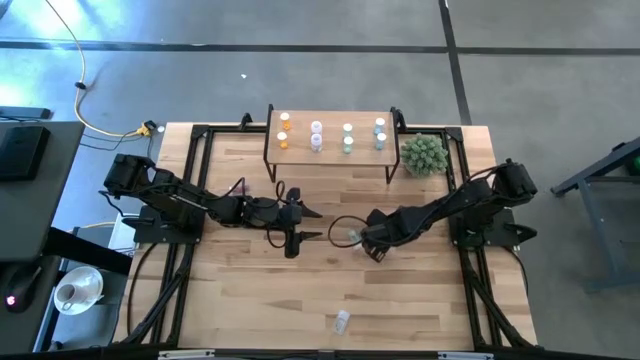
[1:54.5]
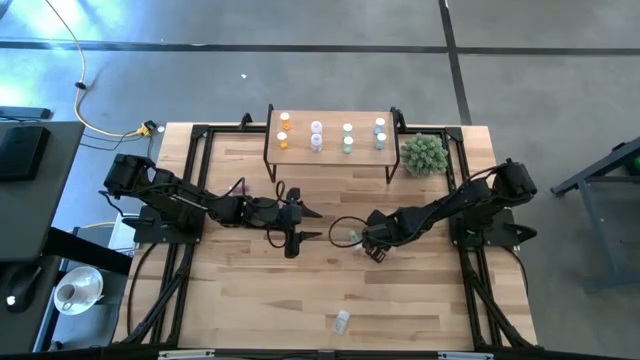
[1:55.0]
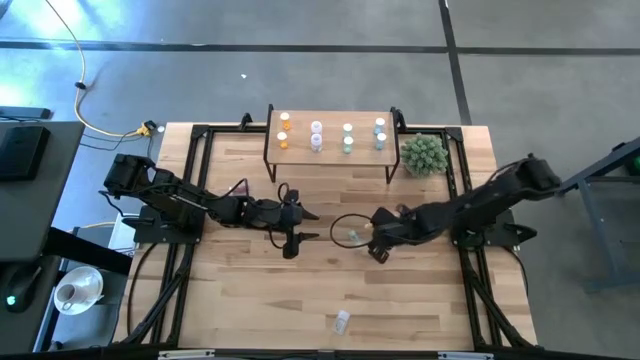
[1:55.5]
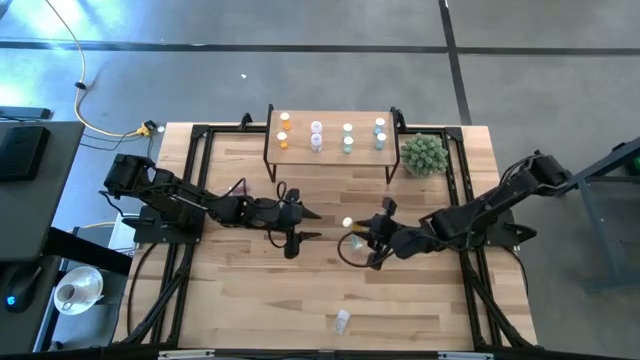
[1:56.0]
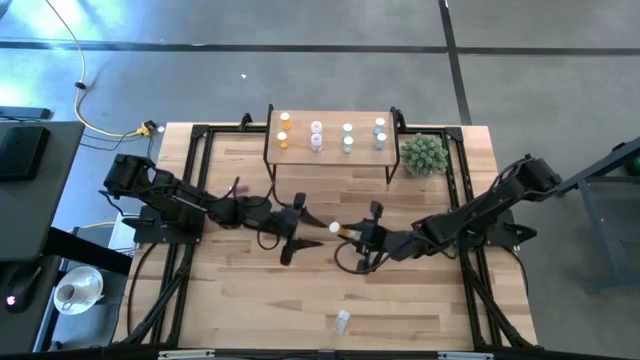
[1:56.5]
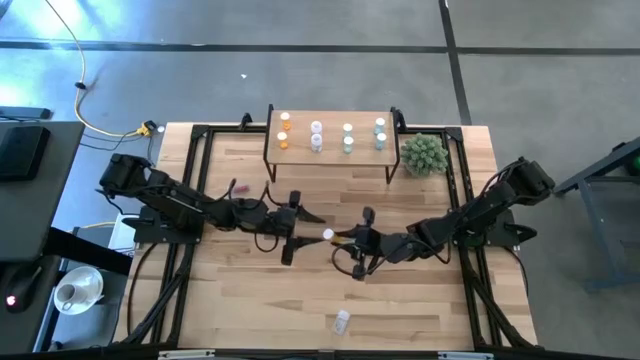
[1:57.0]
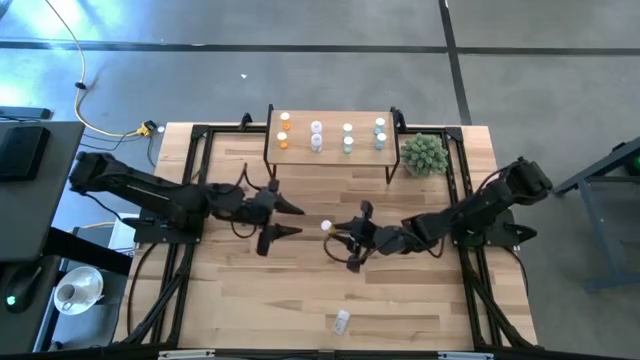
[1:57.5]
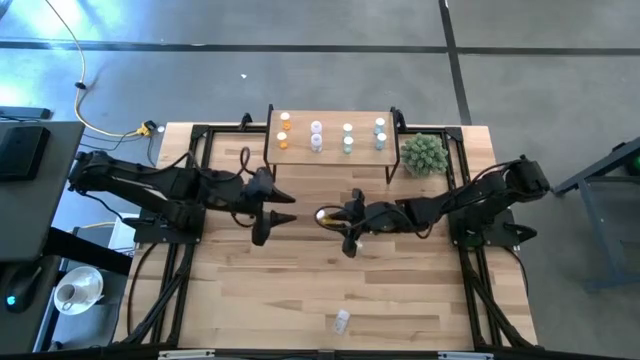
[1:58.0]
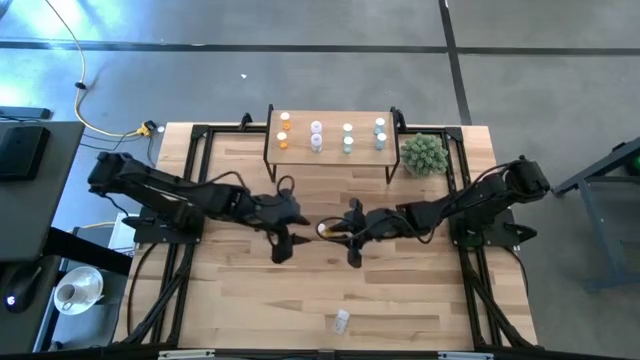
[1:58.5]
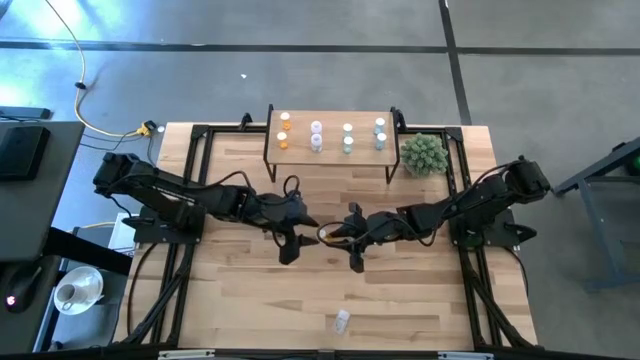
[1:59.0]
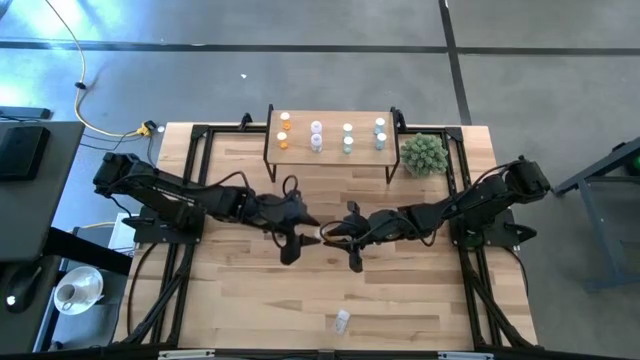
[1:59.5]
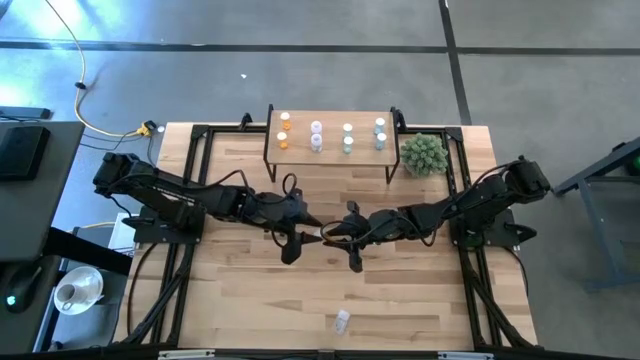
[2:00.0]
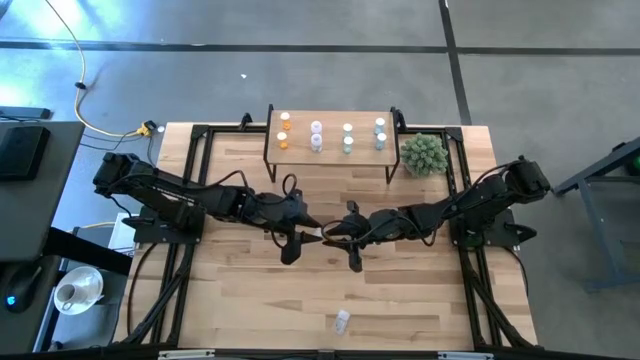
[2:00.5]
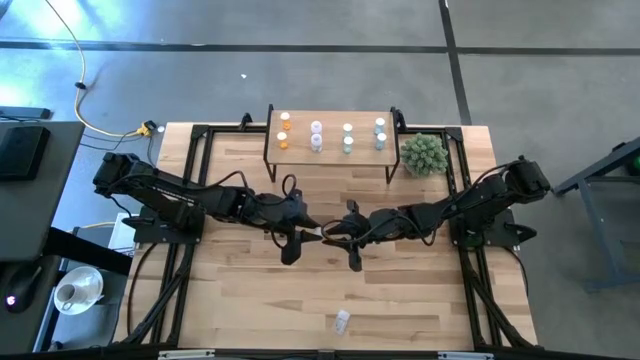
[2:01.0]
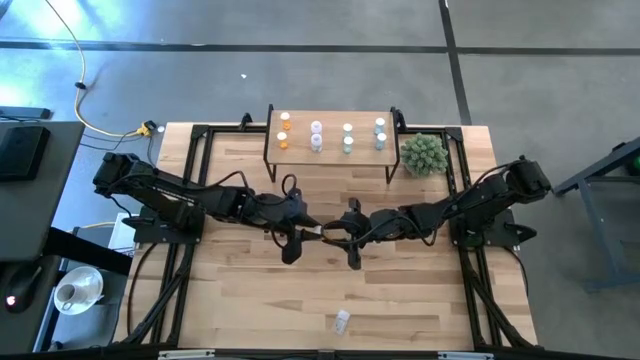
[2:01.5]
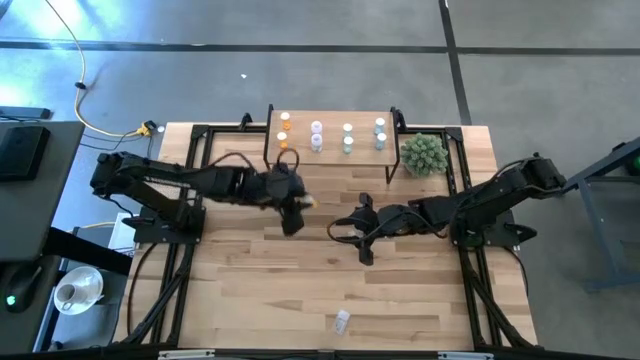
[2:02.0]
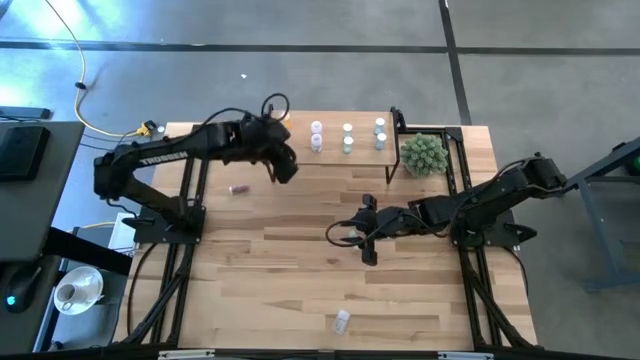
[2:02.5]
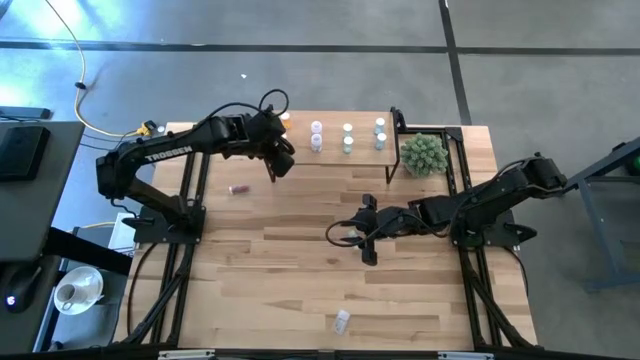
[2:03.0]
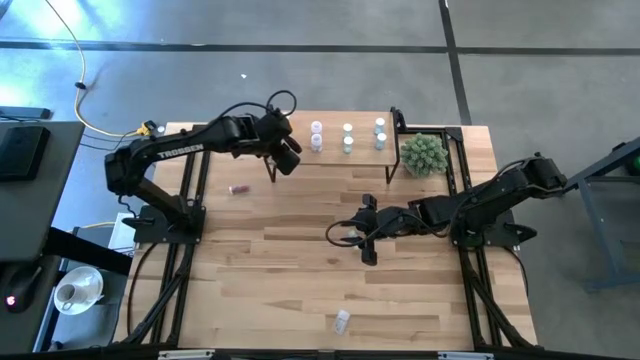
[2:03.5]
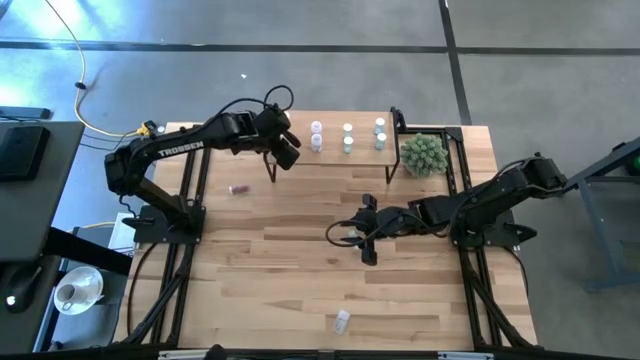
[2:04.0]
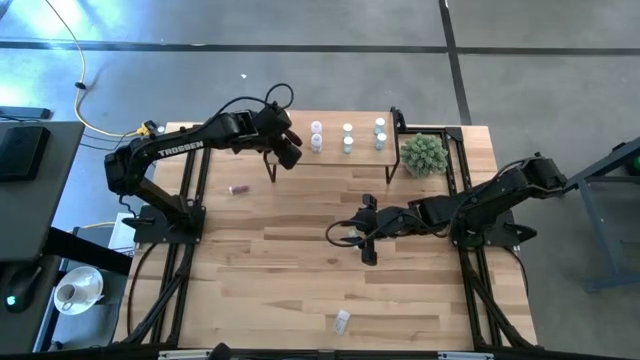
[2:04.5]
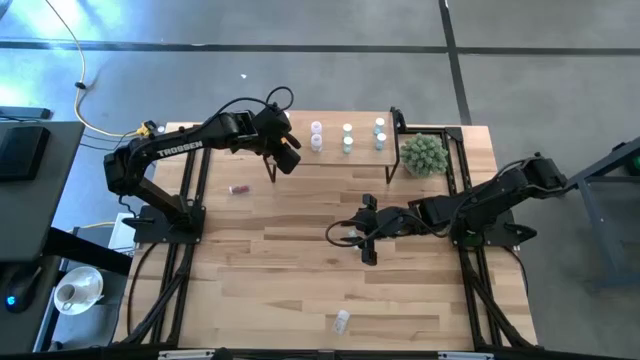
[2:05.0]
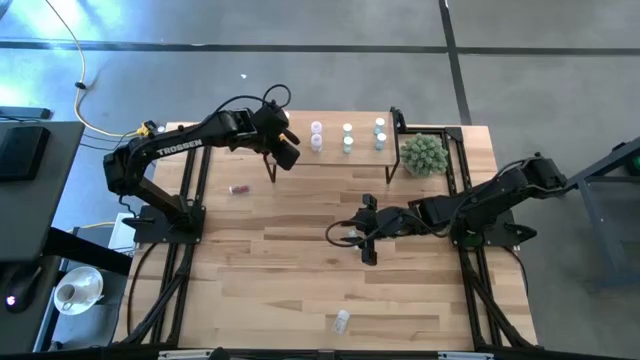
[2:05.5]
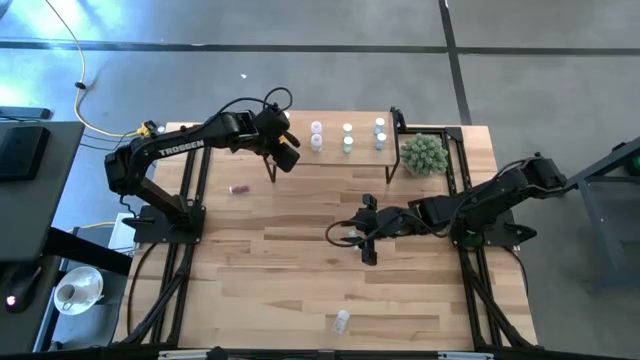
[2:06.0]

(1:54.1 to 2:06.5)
Task: Pick and place medicine bottles onto shelf by color
Put the orange pill bottle on the shelf and aligned with the other orange pill bottles

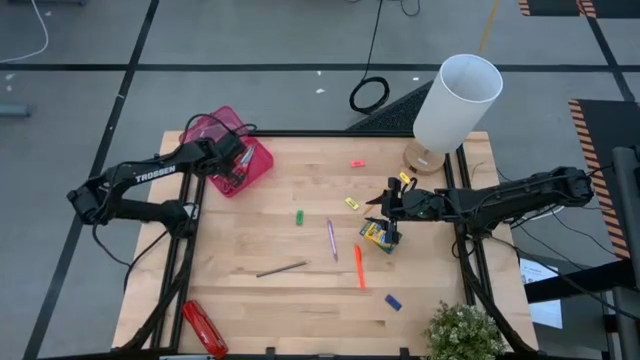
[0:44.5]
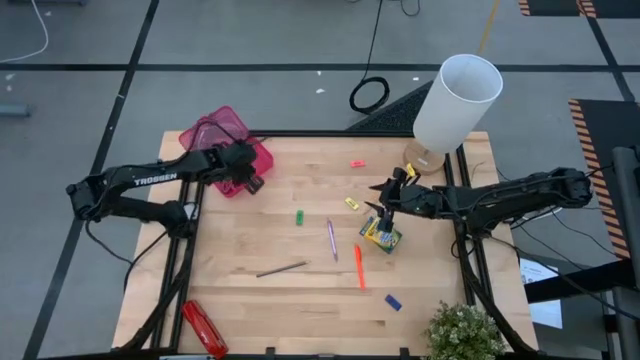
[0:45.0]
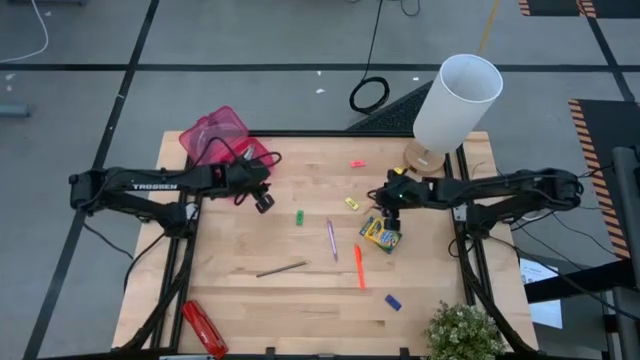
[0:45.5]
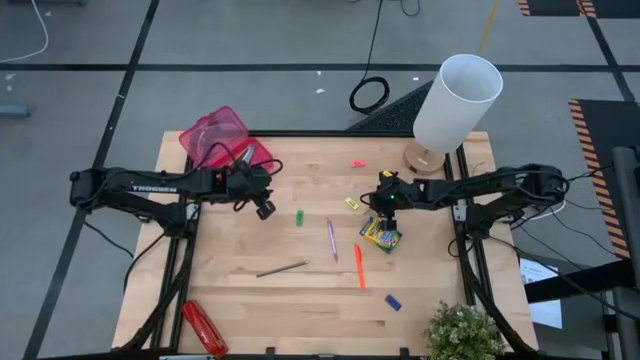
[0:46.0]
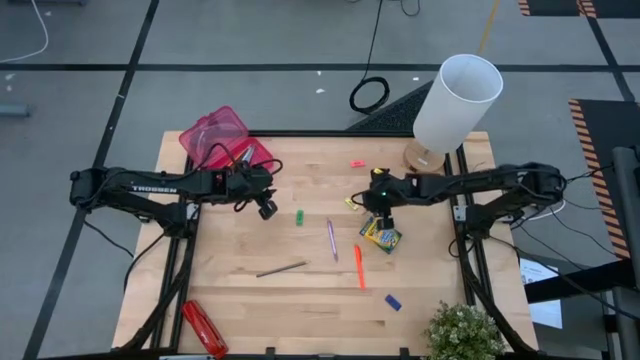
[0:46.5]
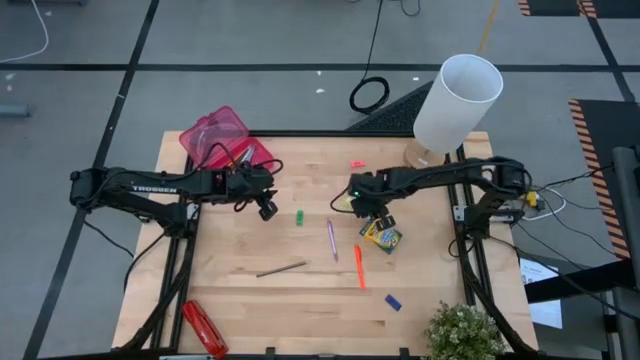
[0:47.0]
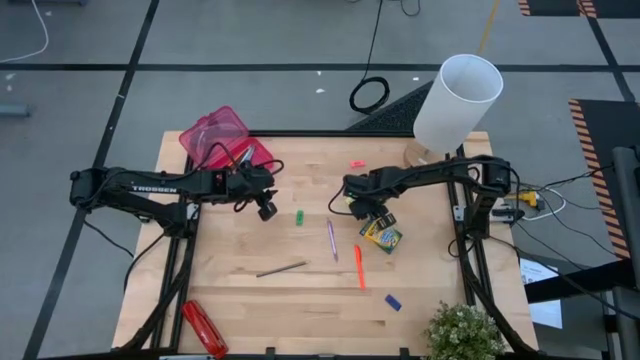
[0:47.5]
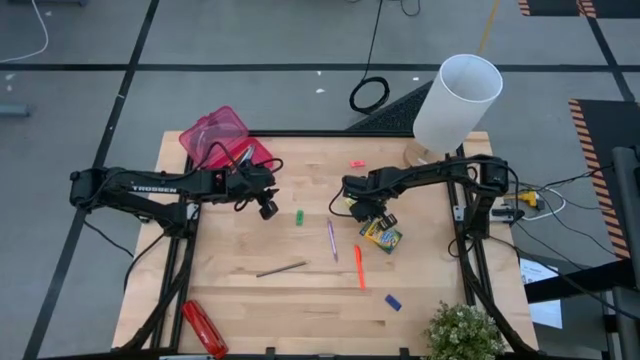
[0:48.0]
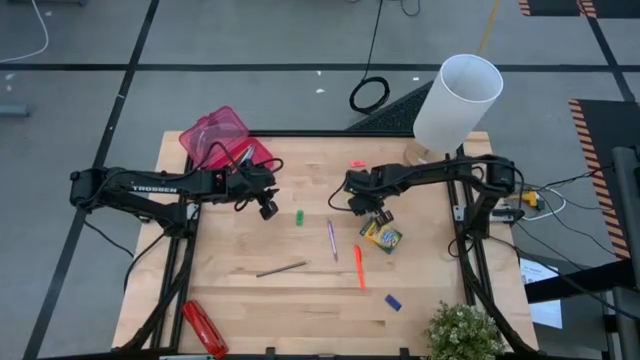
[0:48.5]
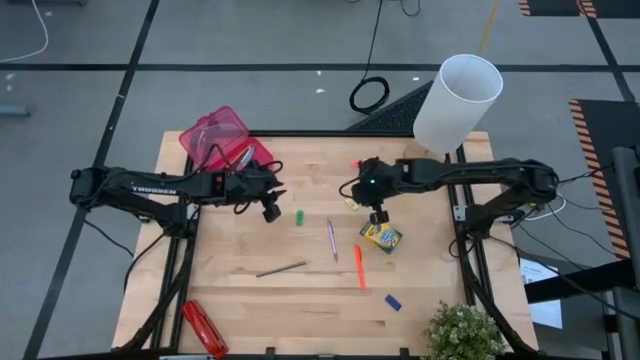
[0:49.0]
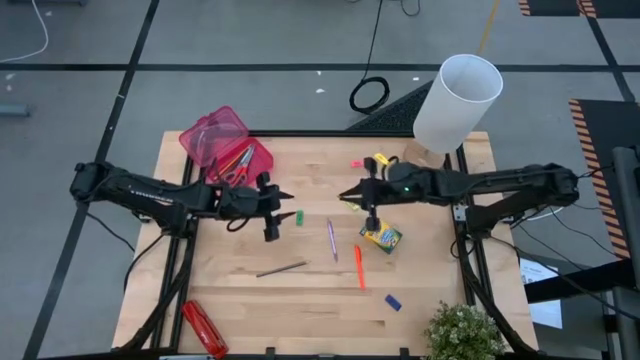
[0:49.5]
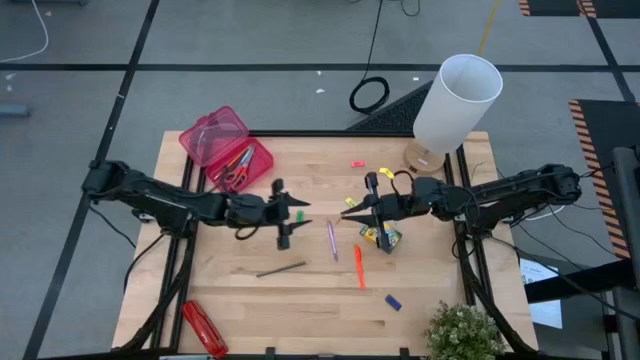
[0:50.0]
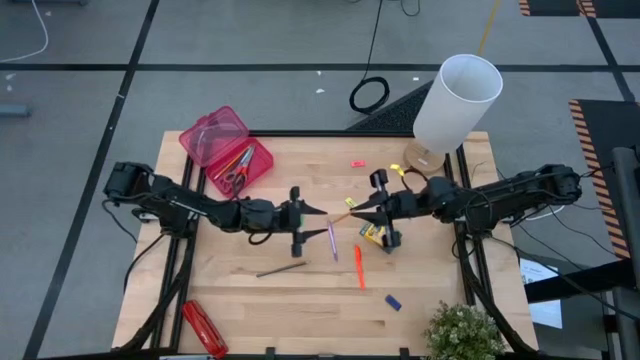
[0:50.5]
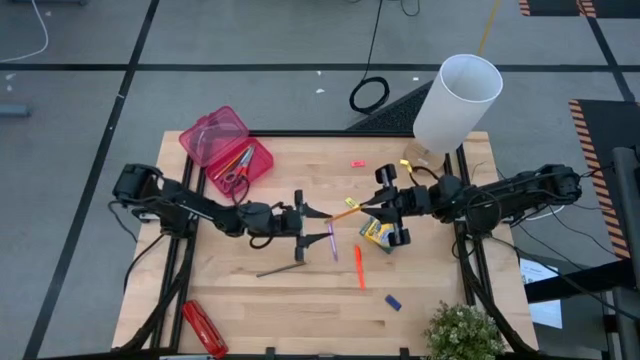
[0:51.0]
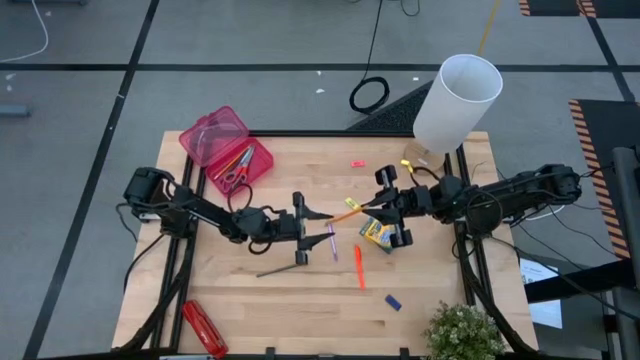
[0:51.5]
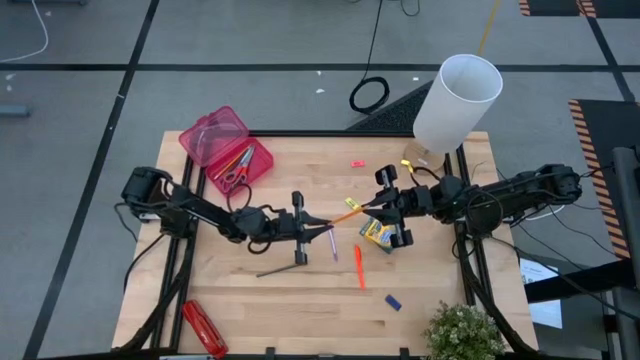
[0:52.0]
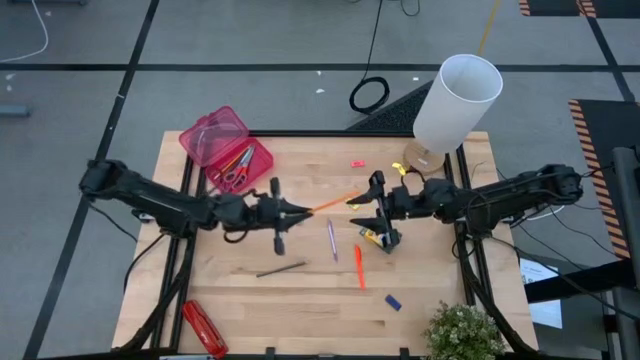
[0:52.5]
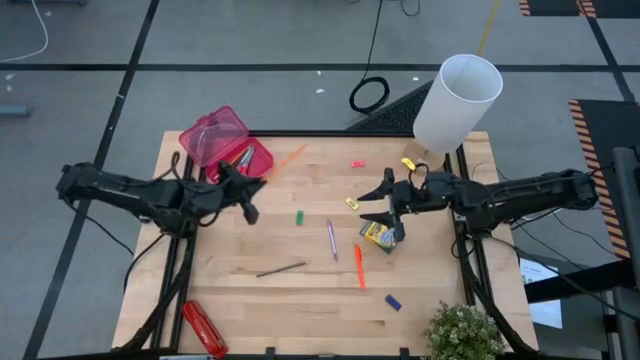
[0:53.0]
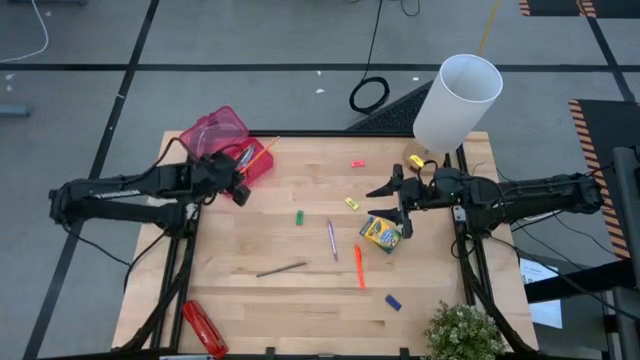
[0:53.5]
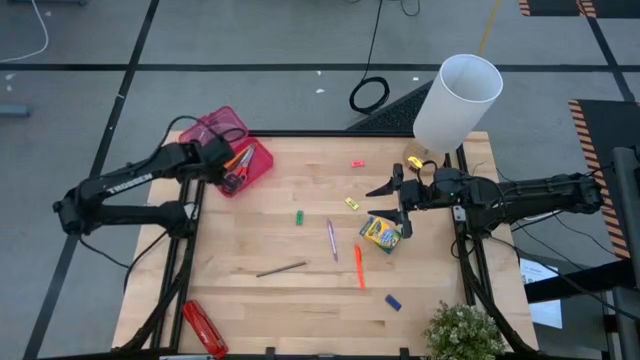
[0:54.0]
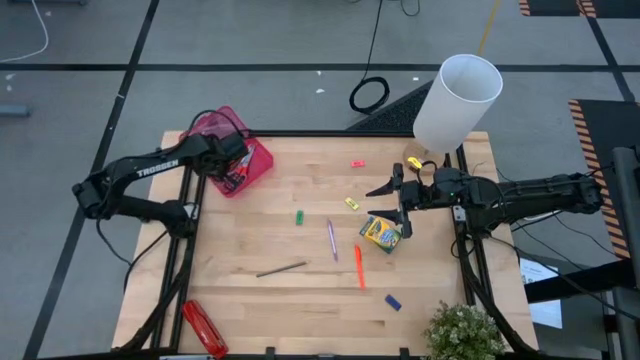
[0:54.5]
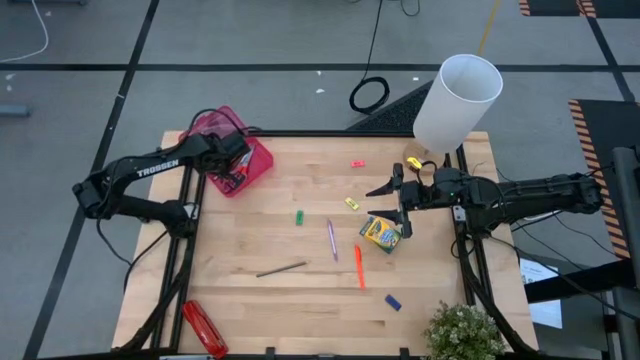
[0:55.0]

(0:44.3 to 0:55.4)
Task: Pack school essentials
Put the yellow pencil into the pink supply box
